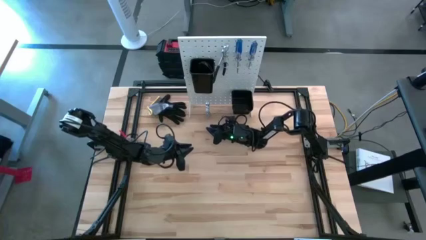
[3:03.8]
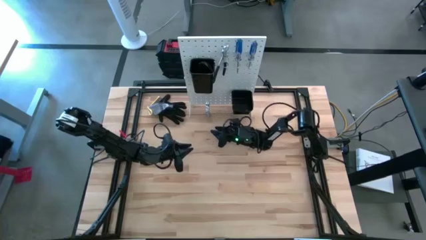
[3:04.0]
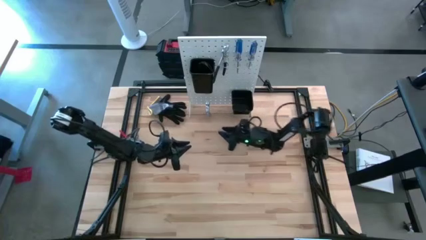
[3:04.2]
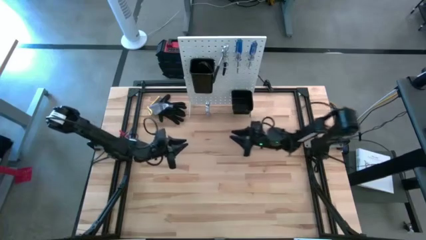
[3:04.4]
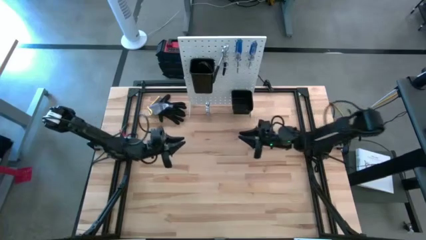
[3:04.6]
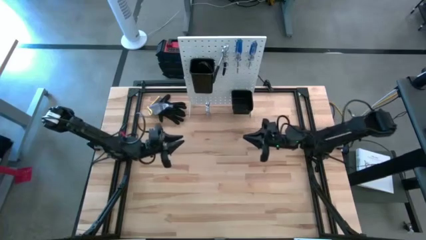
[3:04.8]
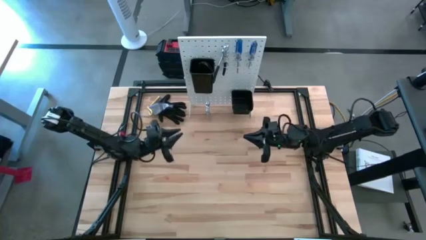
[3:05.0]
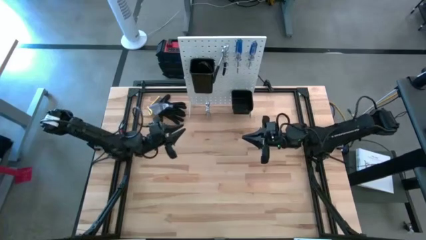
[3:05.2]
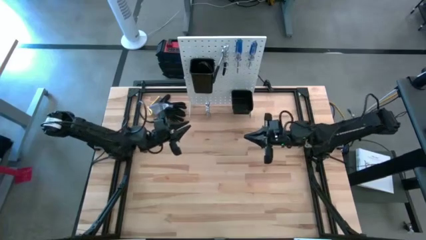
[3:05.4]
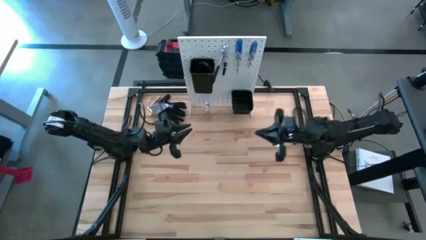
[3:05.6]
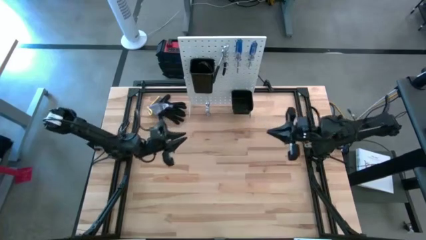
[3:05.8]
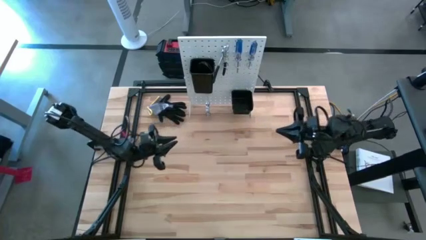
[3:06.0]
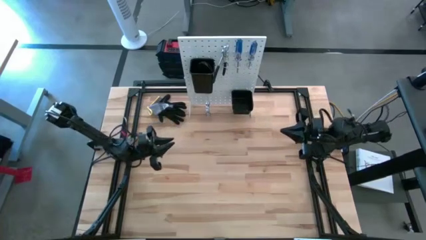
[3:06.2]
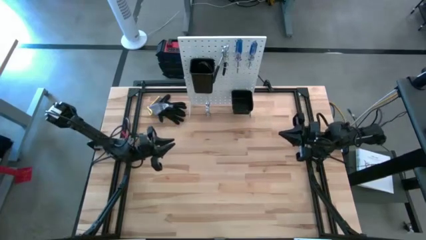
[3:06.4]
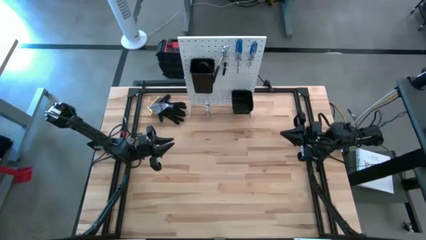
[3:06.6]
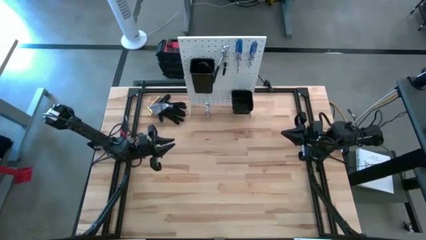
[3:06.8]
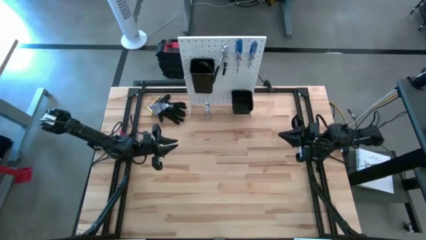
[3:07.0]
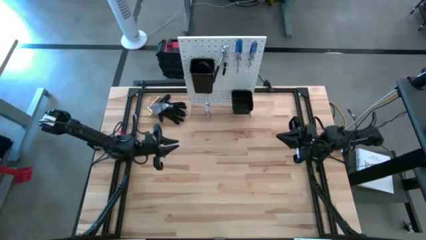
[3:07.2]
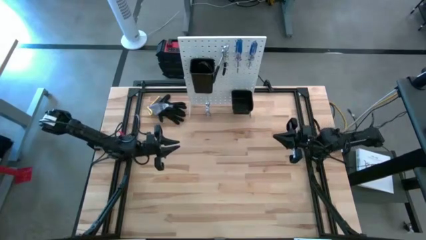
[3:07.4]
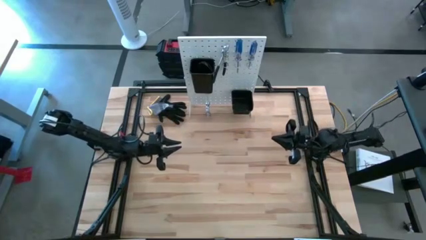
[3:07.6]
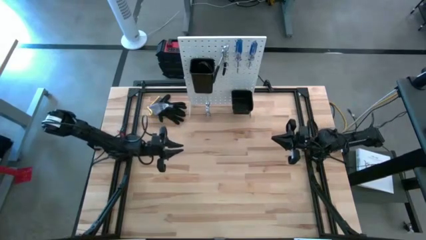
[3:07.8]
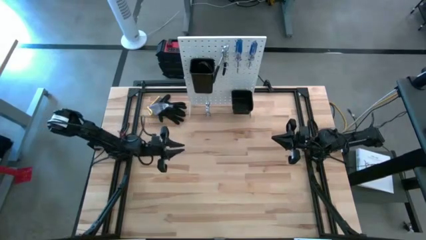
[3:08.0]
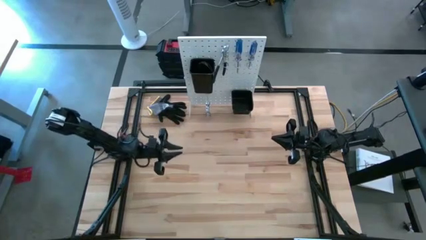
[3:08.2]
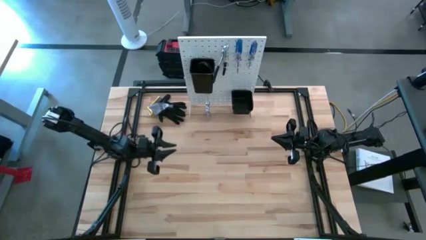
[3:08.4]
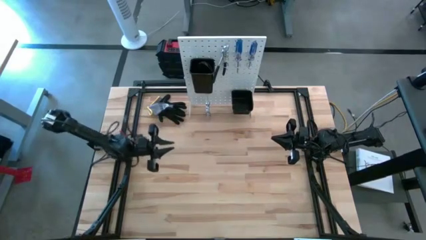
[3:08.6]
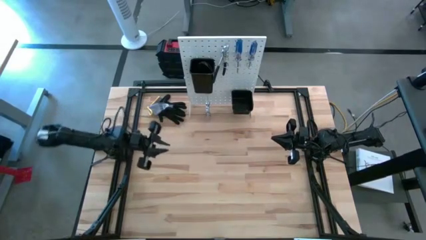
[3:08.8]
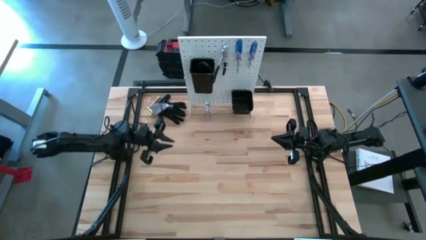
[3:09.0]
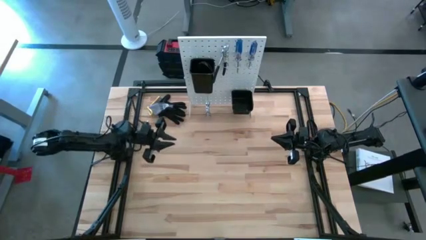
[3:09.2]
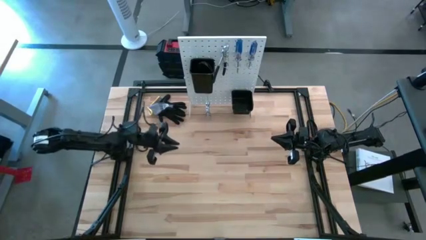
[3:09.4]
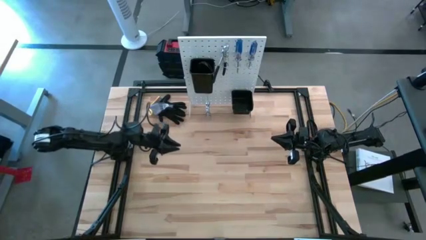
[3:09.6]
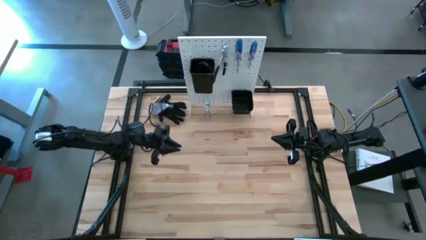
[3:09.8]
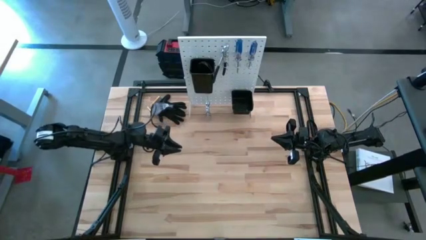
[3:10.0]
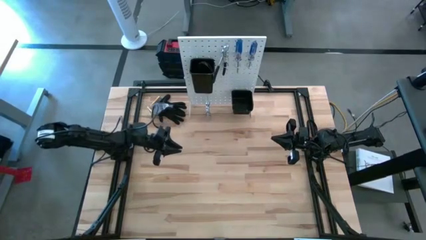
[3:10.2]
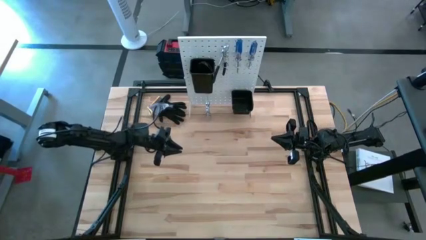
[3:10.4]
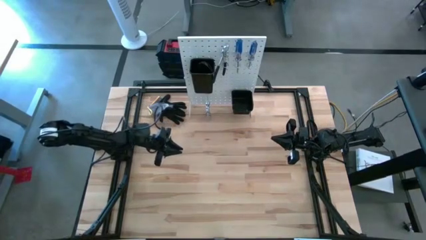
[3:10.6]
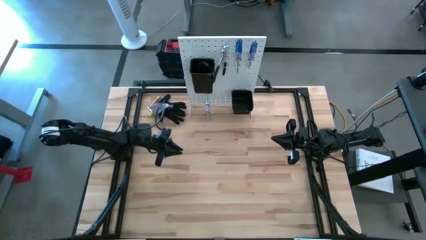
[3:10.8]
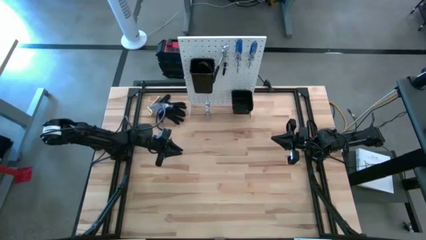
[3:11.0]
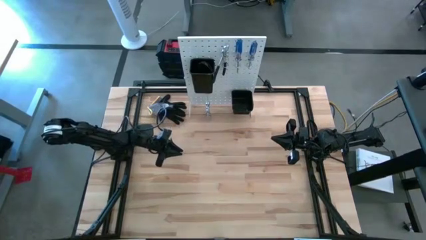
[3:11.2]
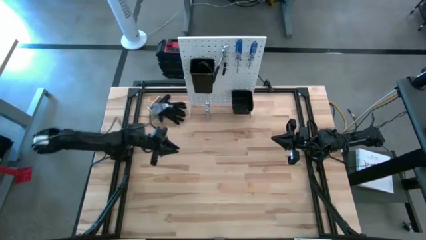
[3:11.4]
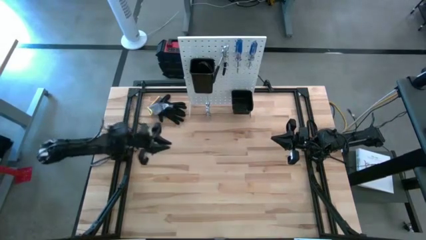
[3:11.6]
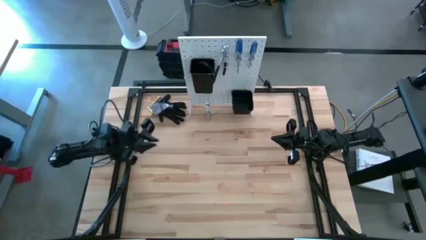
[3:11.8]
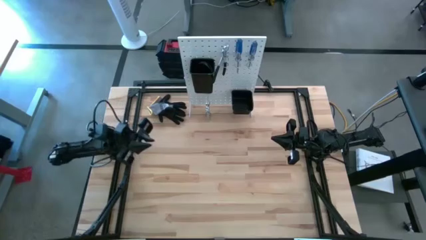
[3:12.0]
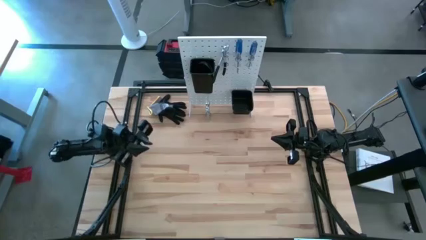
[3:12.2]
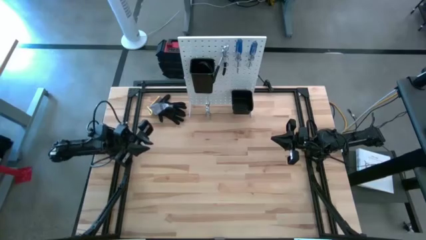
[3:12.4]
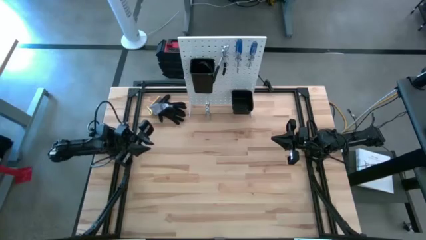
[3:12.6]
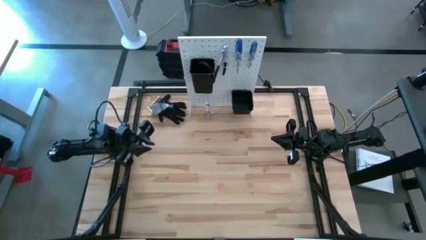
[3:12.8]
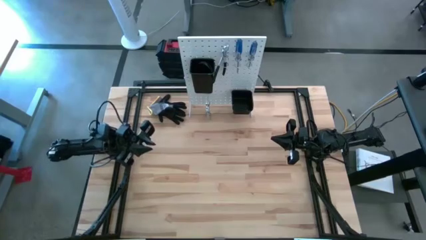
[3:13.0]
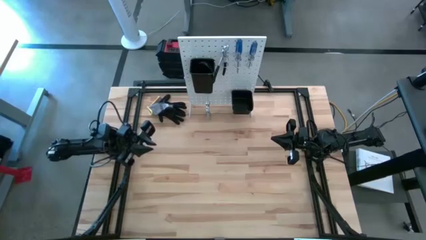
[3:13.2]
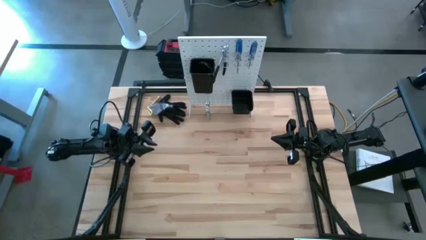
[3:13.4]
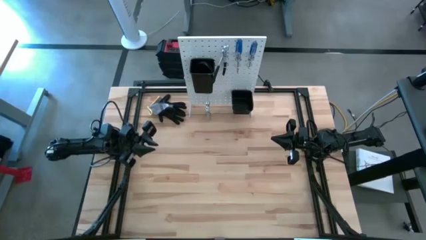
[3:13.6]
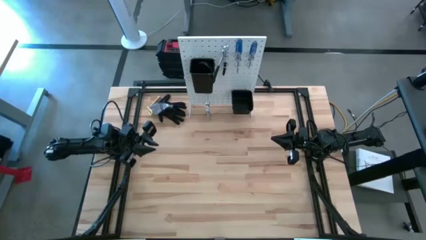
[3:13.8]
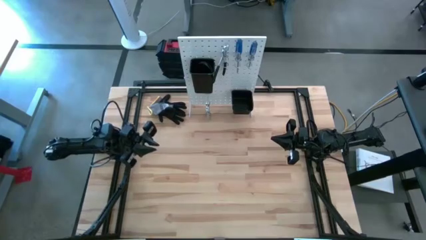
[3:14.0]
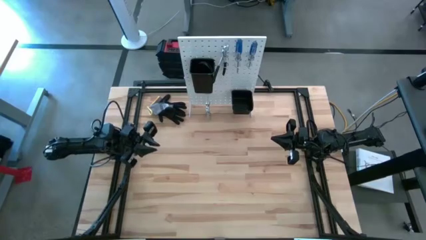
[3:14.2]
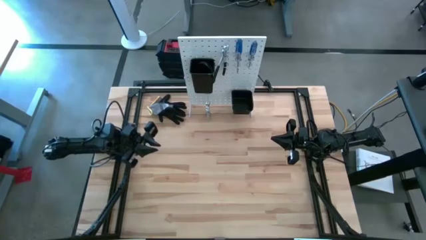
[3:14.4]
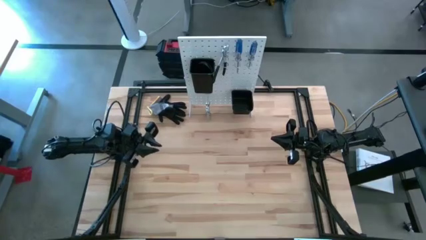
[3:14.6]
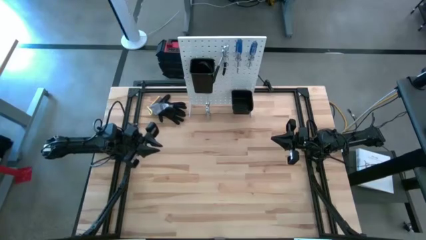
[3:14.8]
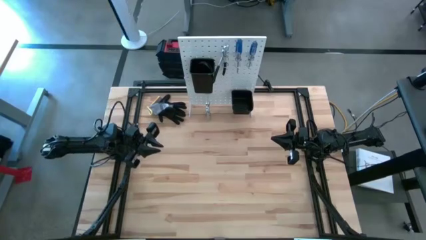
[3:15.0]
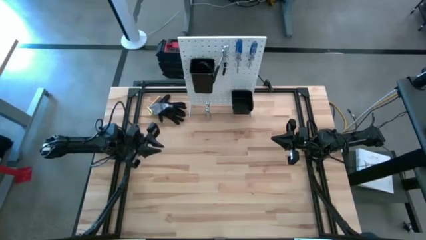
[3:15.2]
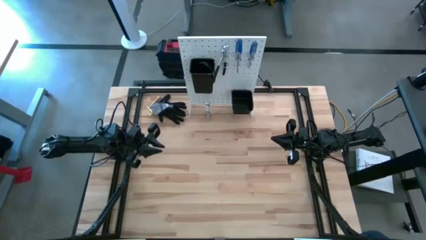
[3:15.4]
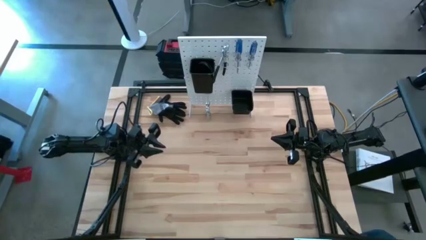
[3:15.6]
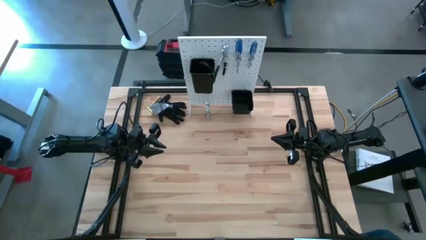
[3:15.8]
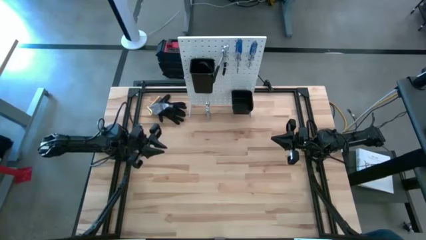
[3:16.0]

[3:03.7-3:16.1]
Task: Hang tools onto peg board
Return to Home Position

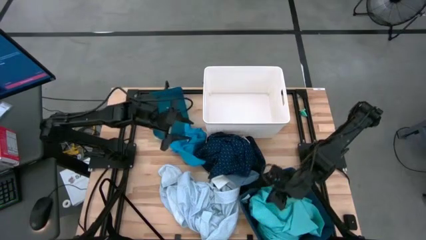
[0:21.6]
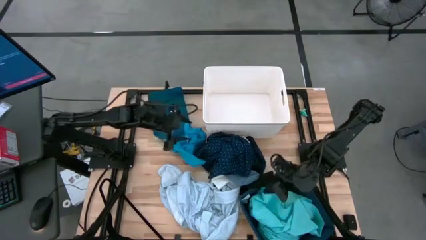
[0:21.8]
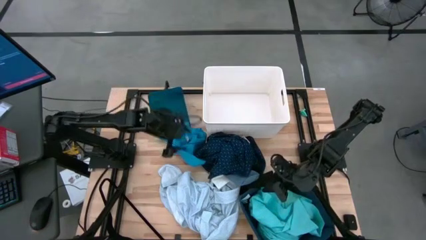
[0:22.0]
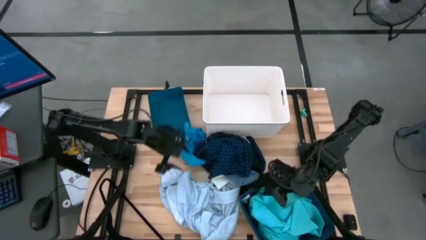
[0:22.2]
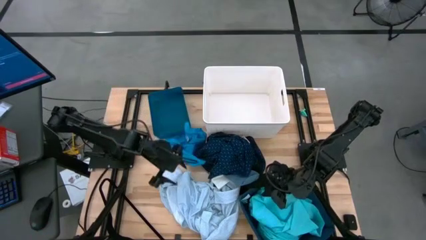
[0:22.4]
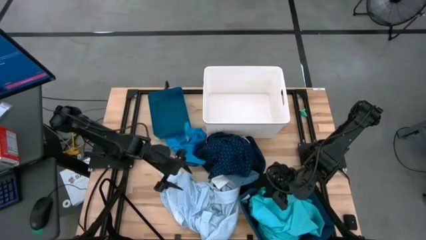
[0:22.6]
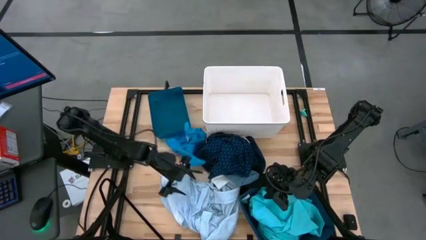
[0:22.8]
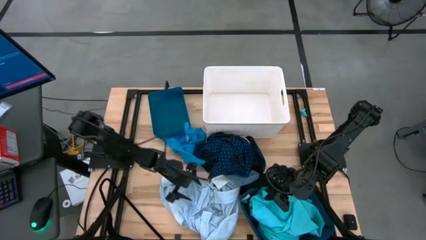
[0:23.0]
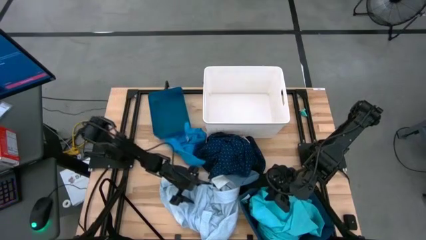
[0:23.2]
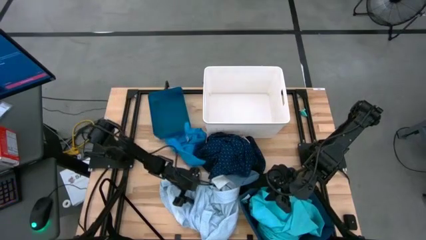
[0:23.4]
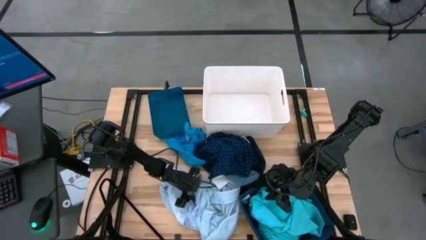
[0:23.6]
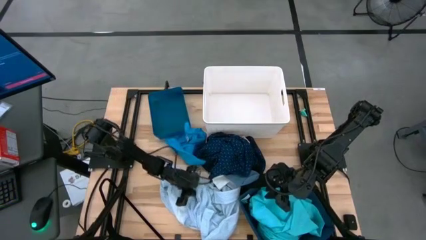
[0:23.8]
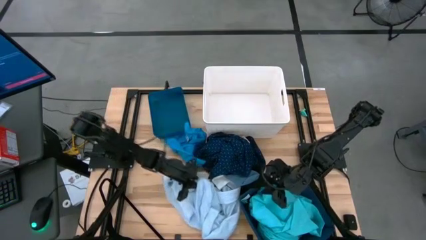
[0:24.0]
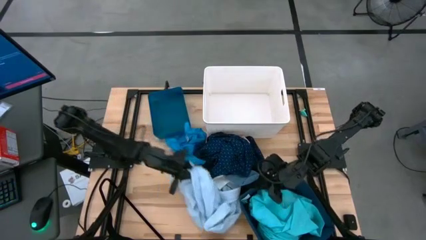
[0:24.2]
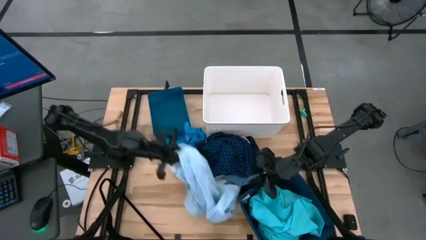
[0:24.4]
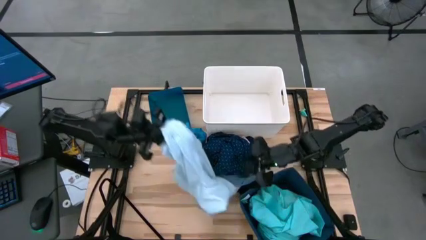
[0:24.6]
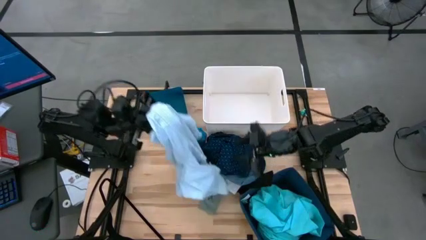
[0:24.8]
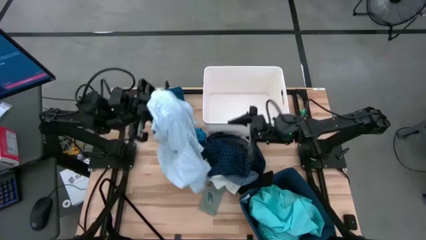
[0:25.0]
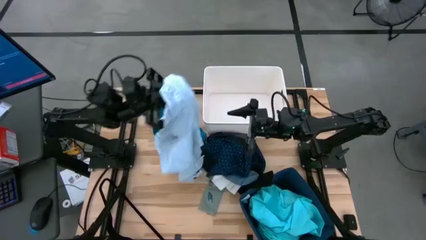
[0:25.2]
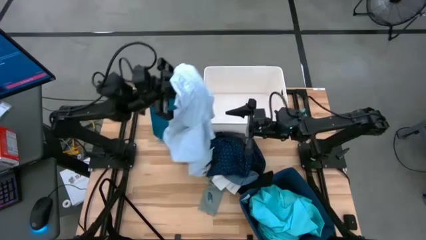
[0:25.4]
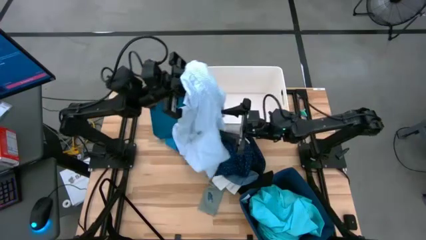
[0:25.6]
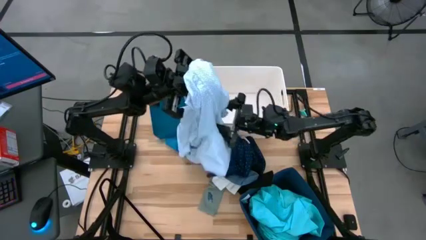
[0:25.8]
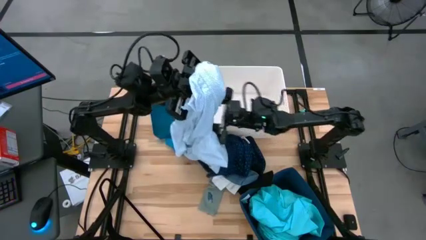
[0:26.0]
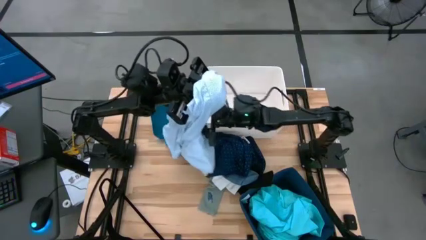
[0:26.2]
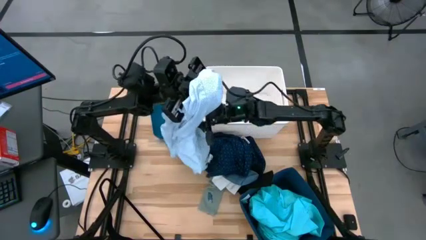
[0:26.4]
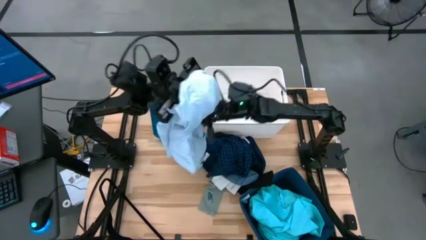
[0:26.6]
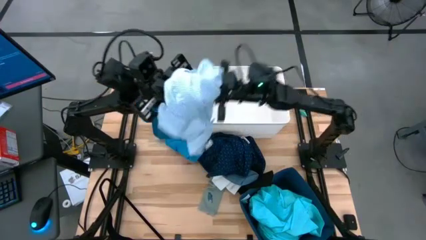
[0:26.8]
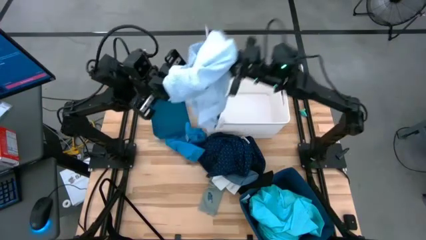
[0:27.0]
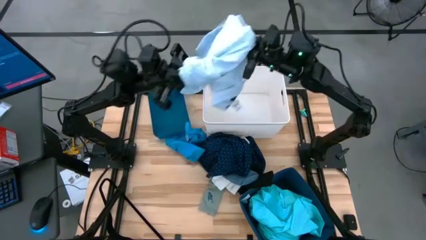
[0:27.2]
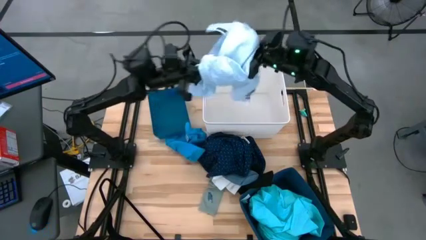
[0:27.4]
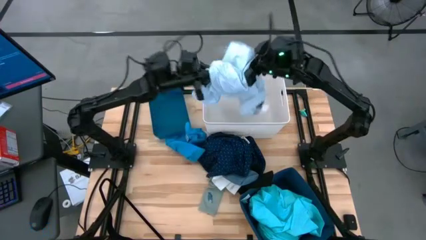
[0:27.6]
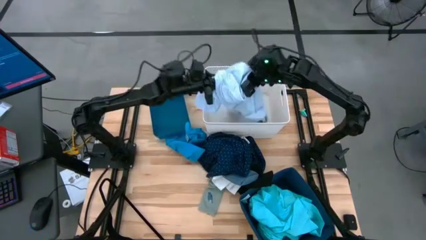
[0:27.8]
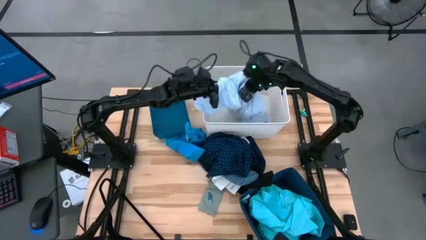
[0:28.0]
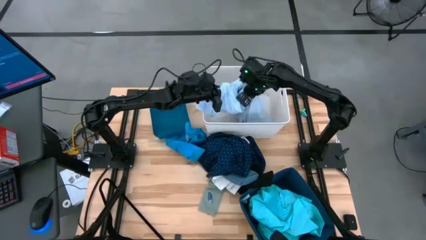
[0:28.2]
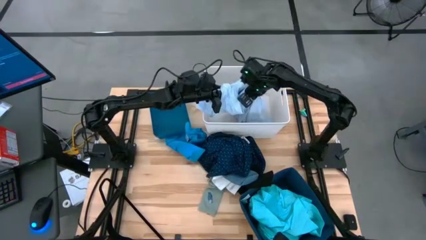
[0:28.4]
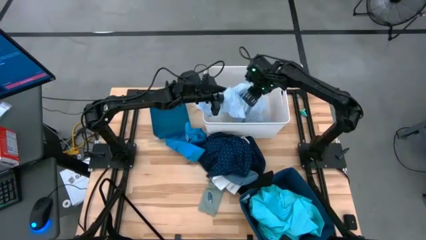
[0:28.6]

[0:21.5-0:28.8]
Task: Pick & Place Cloths
Put the light blue polo shirt into the white bin
